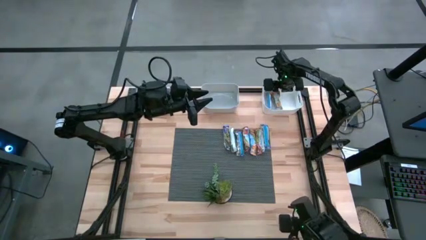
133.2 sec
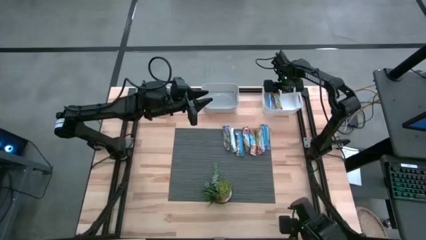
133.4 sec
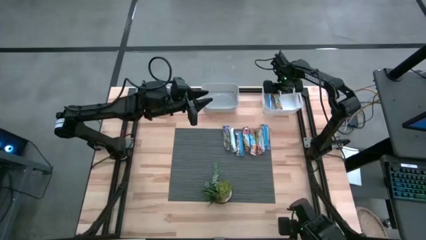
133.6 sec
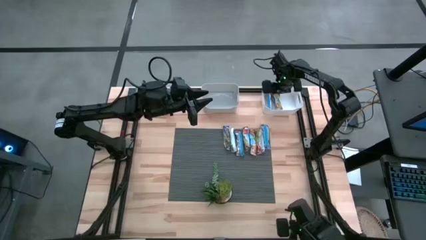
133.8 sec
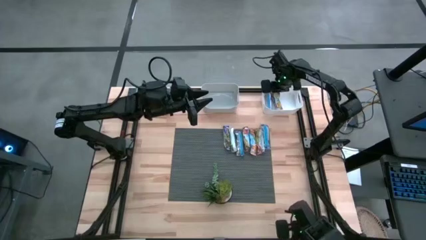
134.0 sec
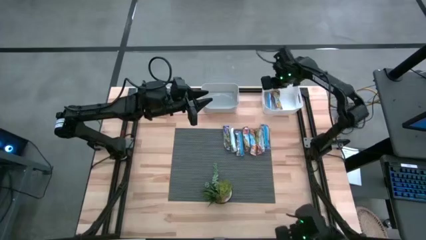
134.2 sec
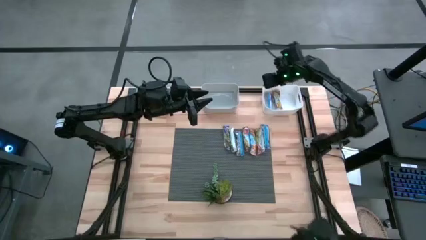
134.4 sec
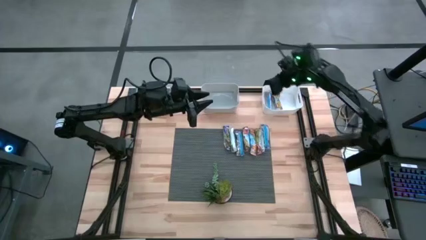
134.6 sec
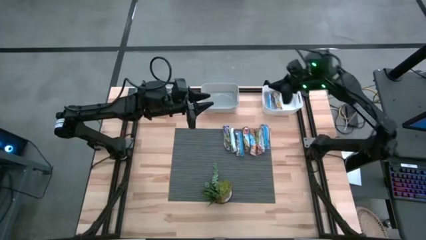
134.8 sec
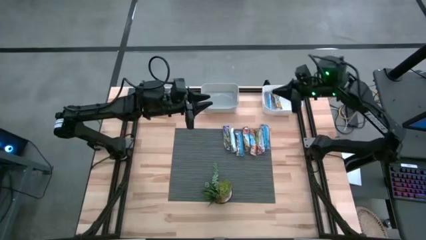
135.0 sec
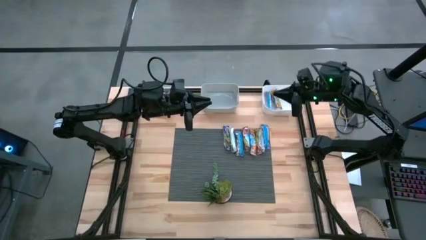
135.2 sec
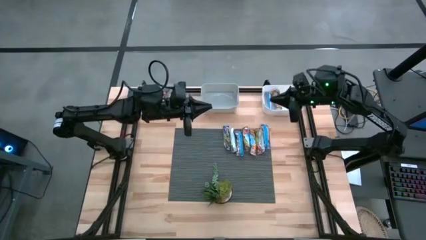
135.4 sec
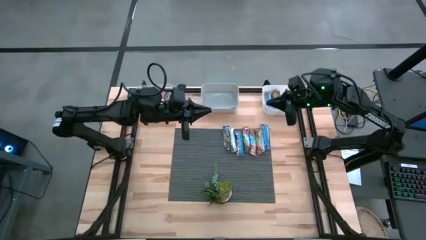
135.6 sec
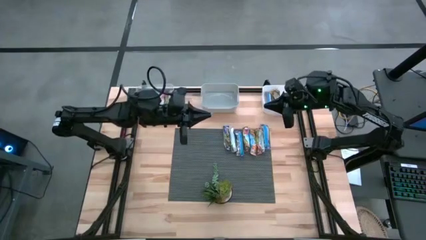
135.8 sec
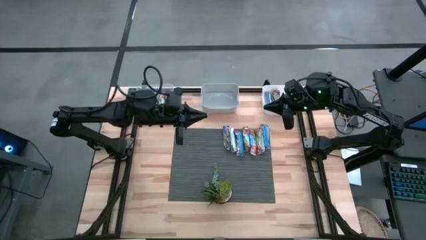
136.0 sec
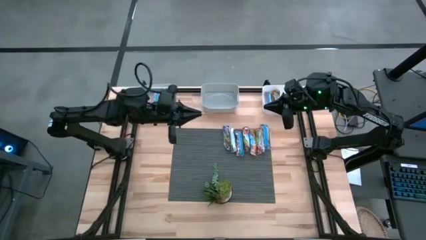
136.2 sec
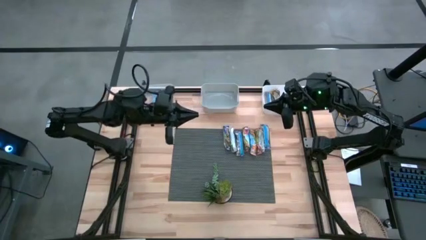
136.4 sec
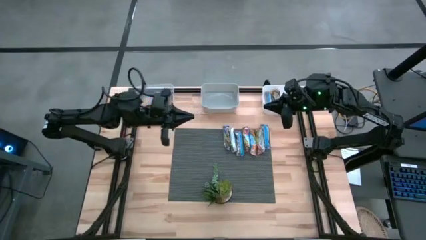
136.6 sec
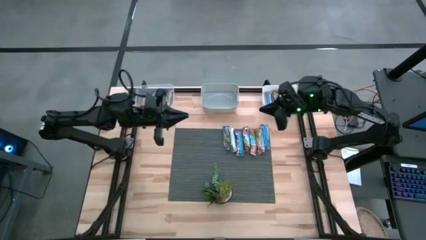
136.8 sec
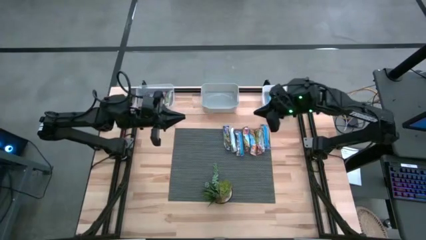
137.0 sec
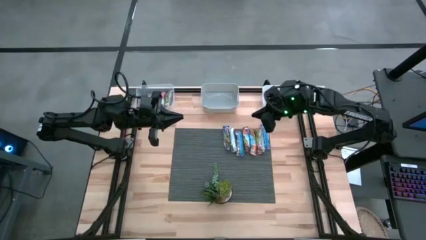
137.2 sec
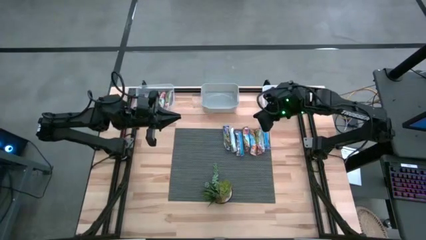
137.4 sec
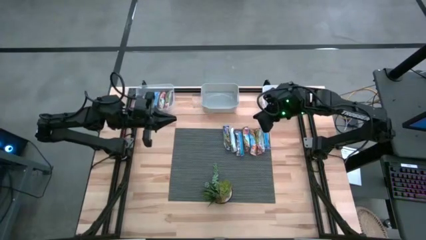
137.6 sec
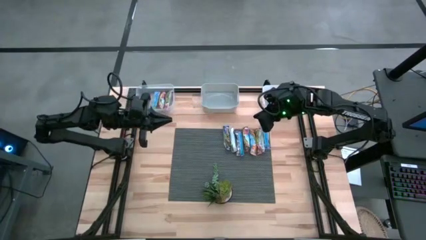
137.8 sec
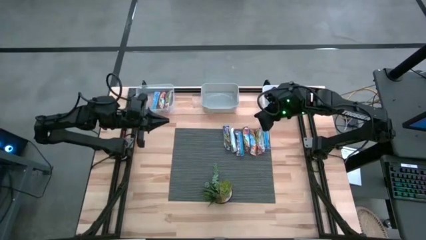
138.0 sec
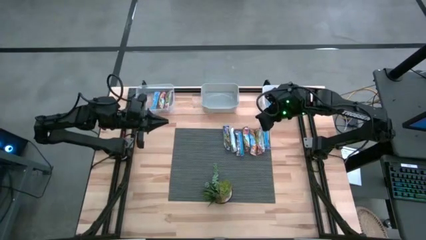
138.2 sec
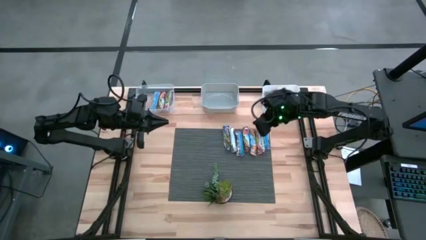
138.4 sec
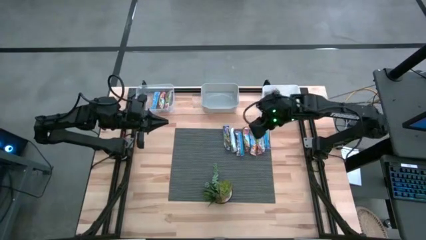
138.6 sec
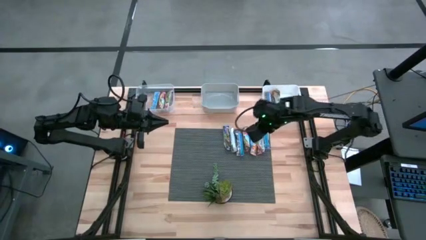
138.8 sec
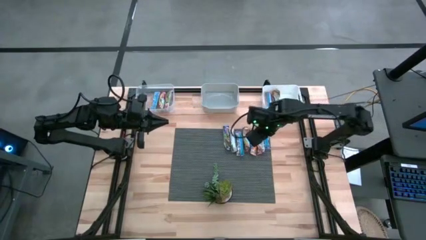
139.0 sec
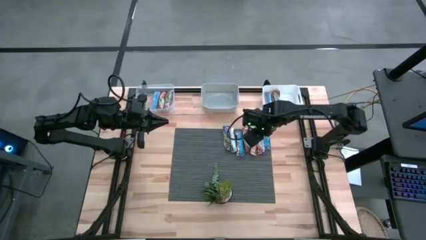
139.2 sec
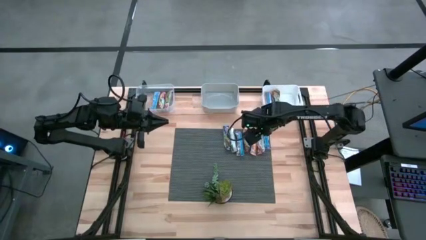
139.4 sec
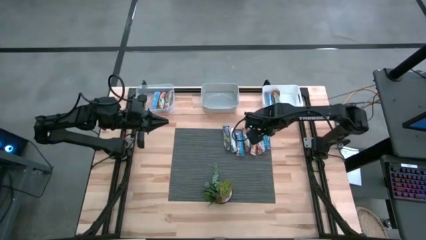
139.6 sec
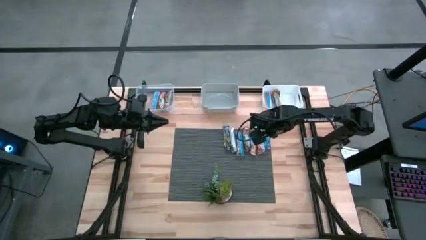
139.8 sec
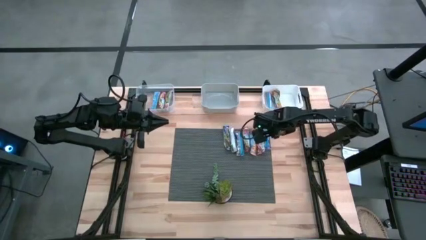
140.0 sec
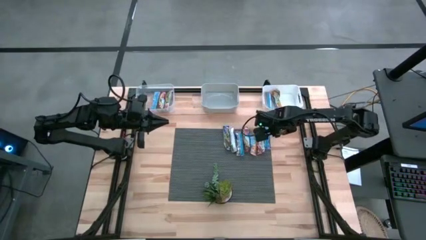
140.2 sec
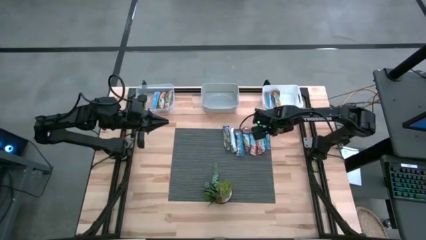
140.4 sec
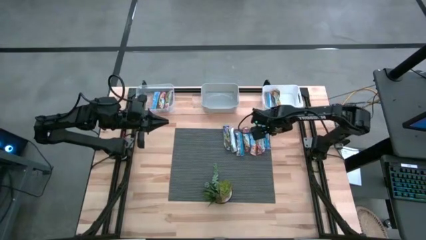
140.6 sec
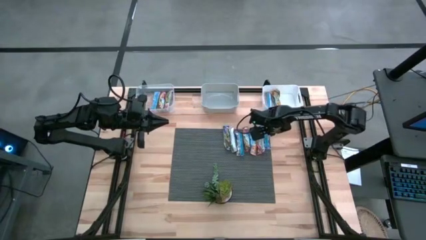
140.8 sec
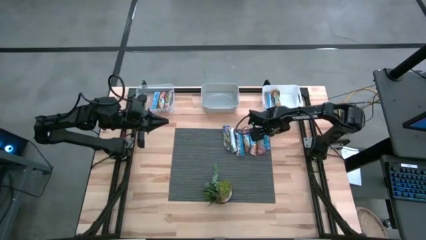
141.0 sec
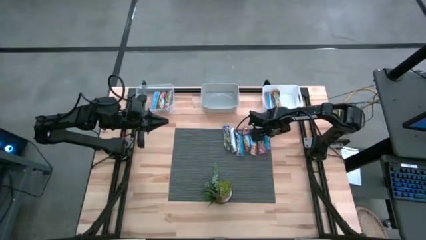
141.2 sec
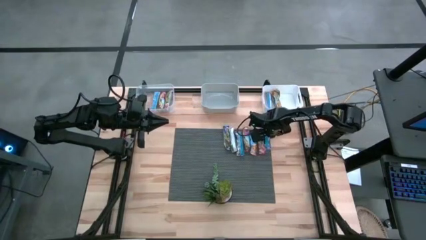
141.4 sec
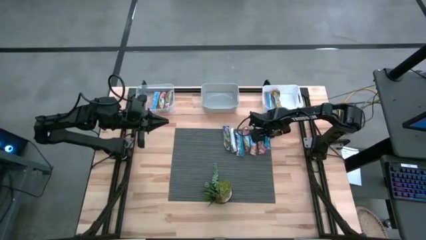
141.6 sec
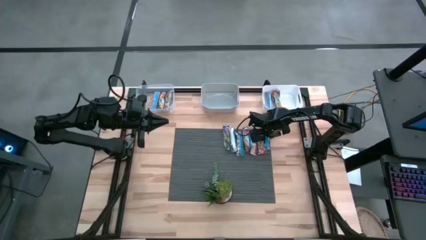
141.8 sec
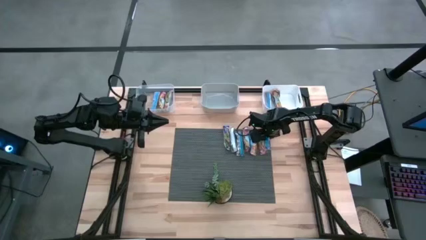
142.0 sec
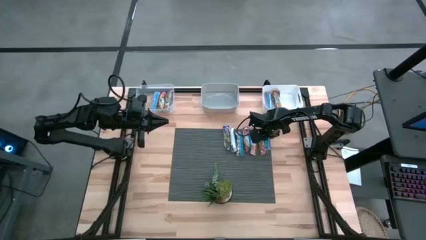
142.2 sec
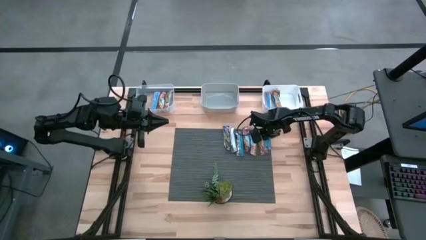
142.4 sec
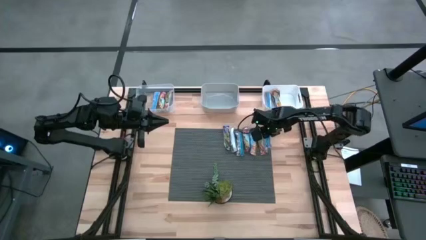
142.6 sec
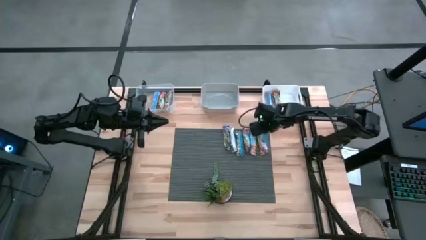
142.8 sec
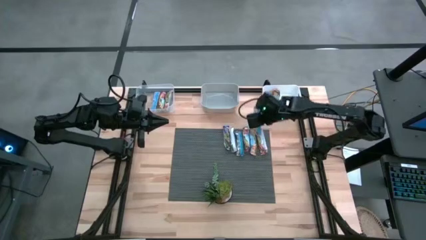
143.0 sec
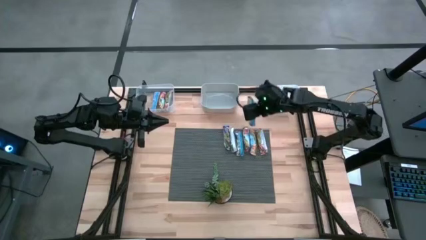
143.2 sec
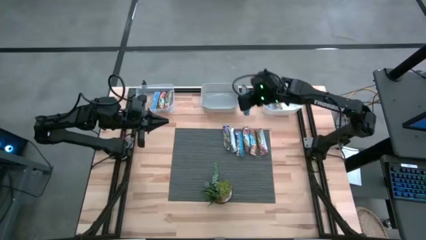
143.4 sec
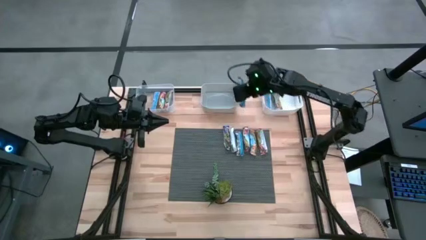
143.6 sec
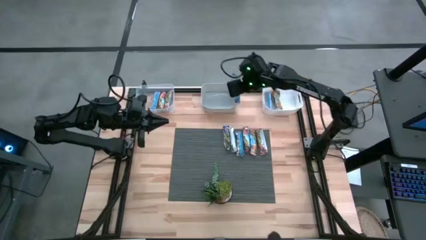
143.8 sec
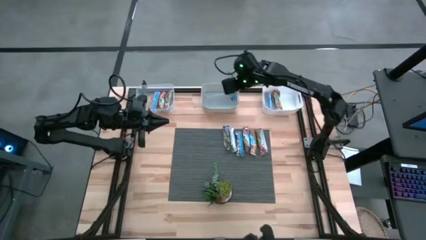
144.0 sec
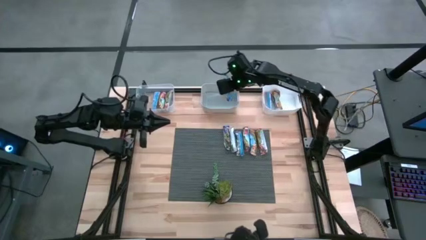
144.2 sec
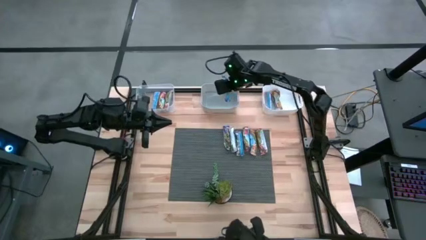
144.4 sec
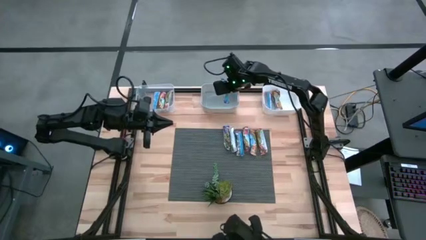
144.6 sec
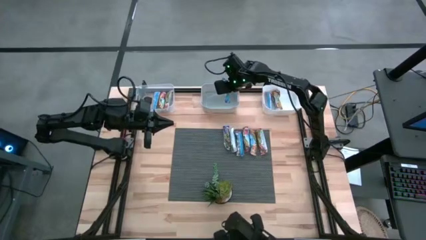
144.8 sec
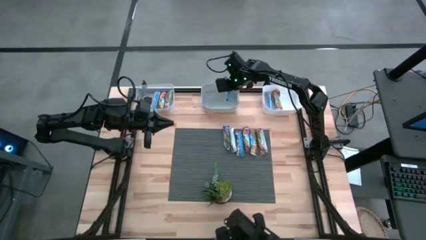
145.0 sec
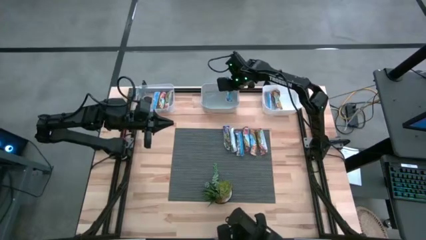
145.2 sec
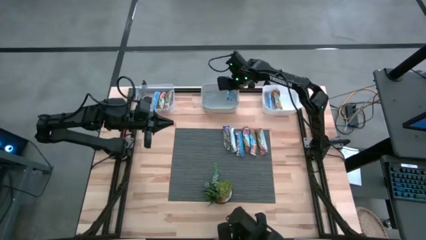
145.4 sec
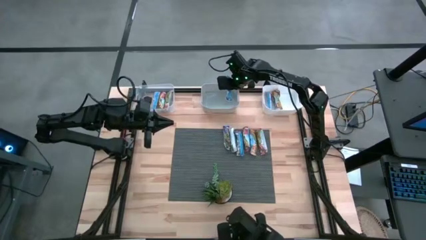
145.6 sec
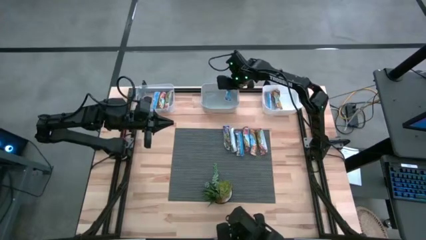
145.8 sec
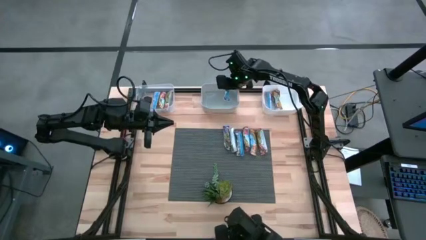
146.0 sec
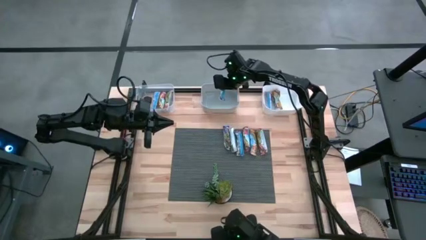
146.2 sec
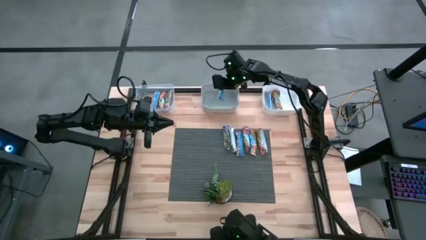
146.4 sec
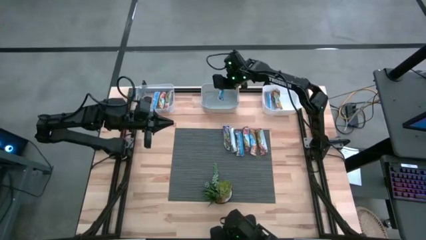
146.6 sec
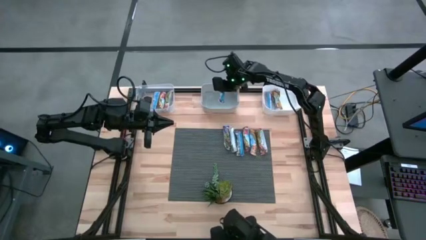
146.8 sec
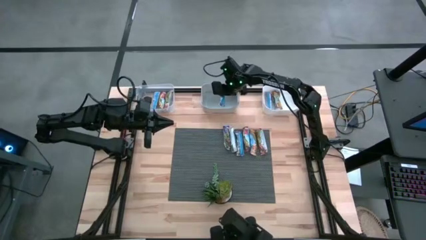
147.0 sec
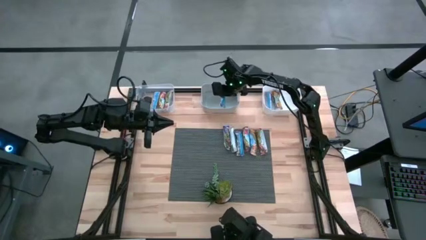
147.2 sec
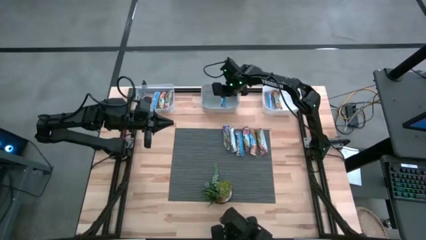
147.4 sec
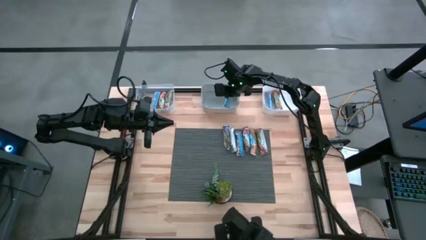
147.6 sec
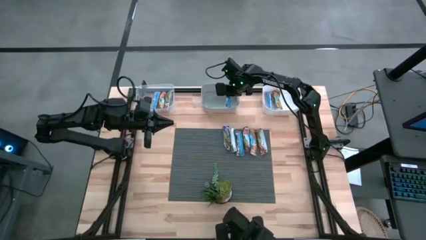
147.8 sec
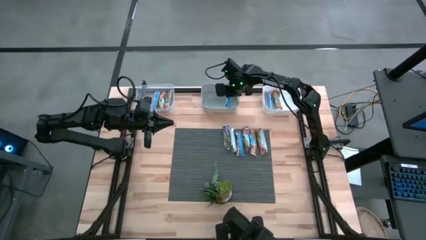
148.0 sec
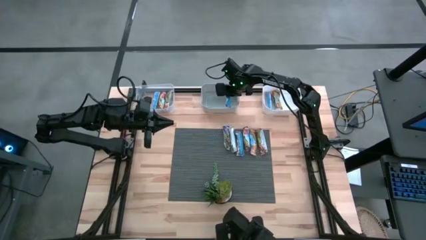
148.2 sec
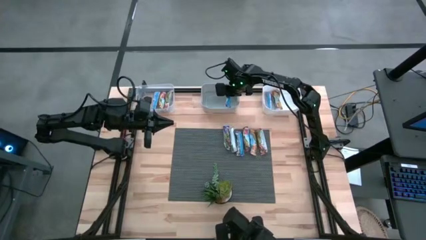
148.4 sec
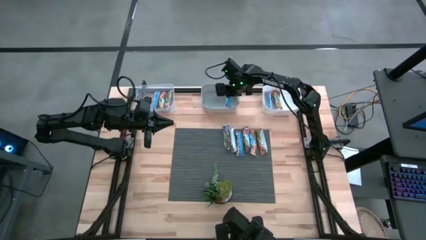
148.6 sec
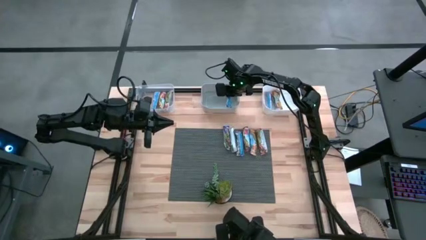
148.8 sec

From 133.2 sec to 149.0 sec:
Task: Pick and place Granola Bars by type
Put the blue granola bar into the gray bin

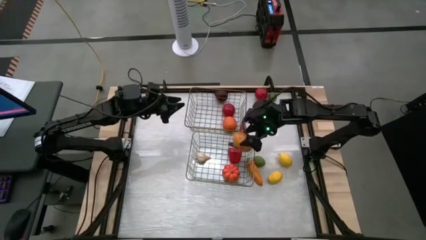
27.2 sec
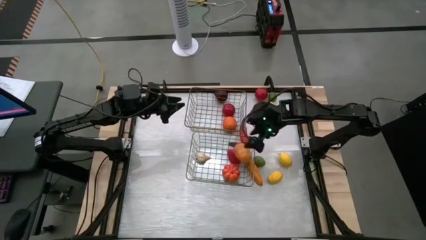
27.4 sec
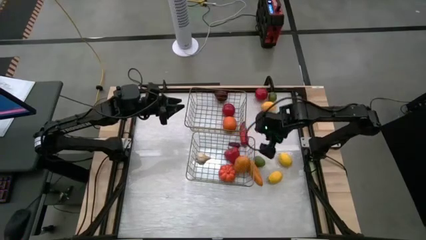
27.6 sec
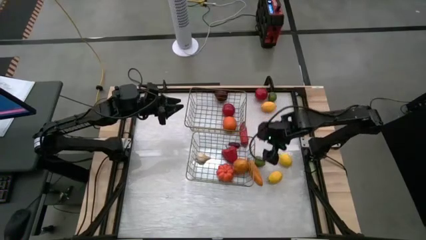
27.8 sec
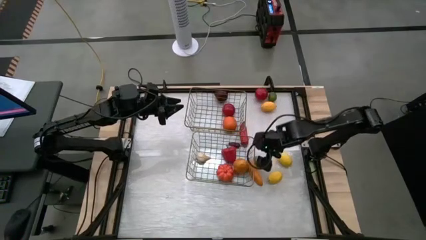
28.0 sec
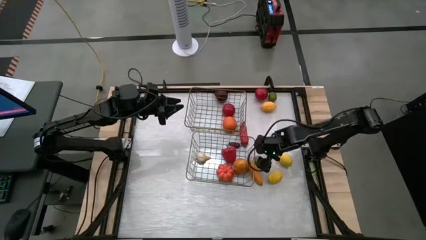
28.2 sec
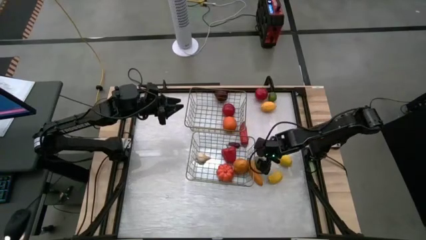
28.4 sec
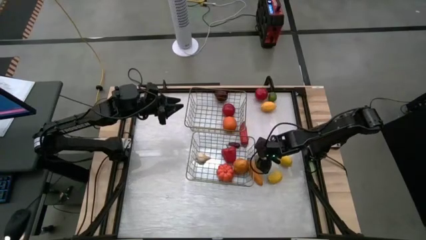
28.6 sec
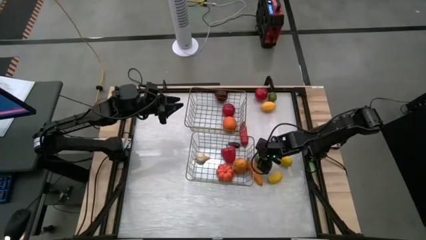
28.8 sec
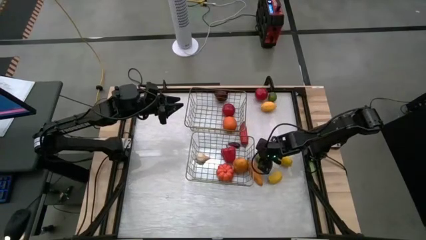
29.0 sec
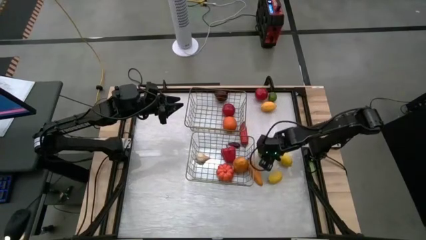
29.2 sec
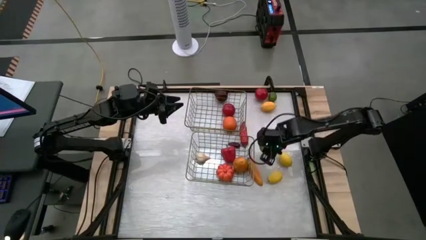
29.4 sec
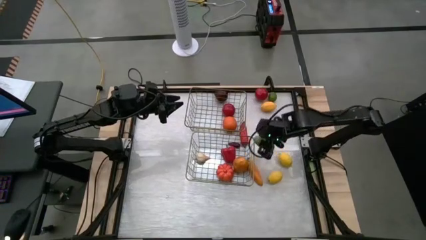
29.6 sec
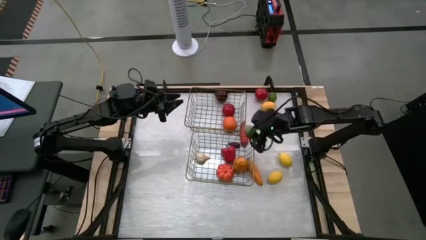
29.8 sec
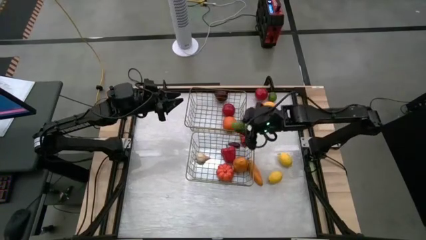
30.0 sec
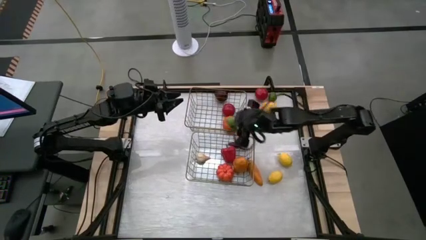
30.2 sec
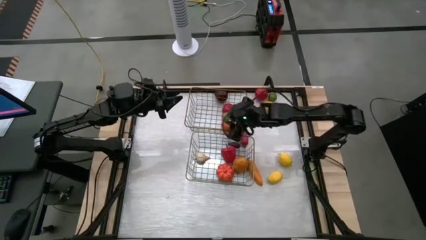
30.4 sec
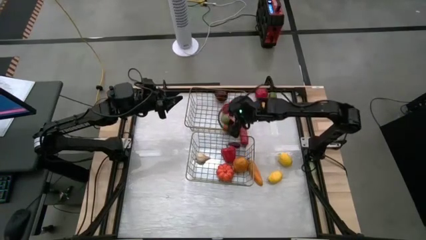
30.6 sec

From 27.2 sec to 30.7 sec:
Task: Sort produce into baskets
Put the bottom green lime fruit into the top wire basket
